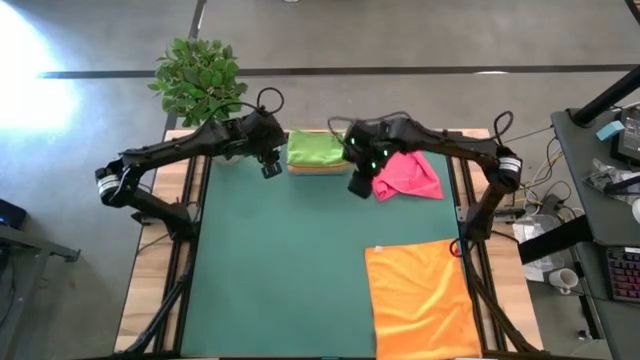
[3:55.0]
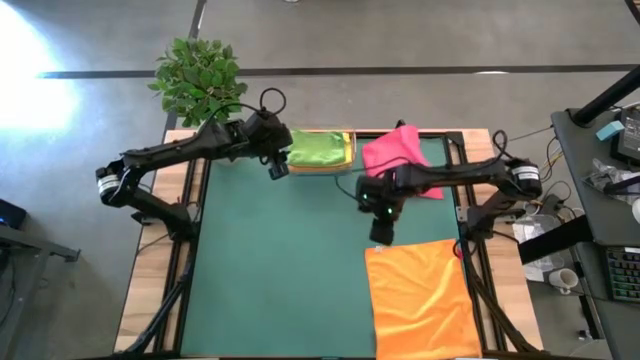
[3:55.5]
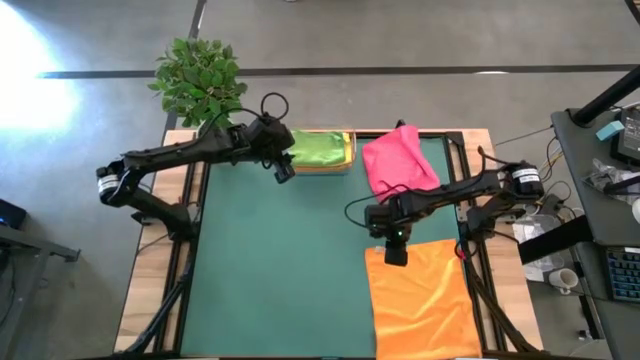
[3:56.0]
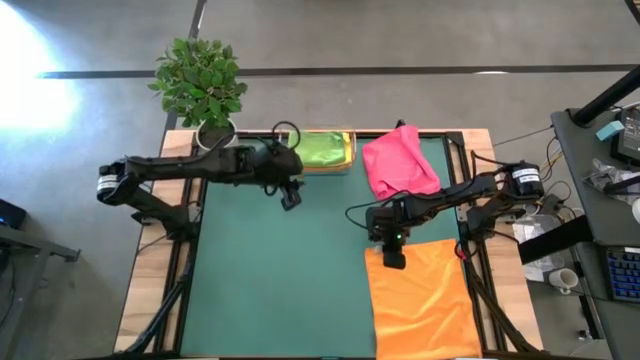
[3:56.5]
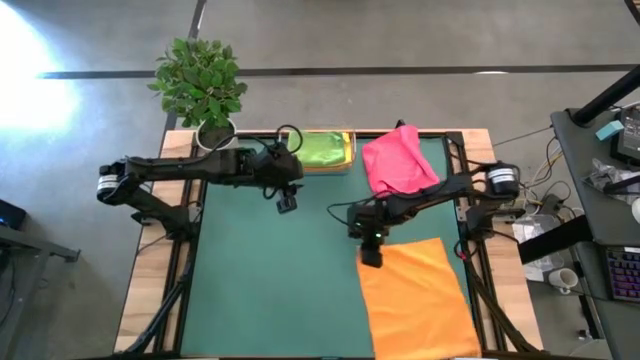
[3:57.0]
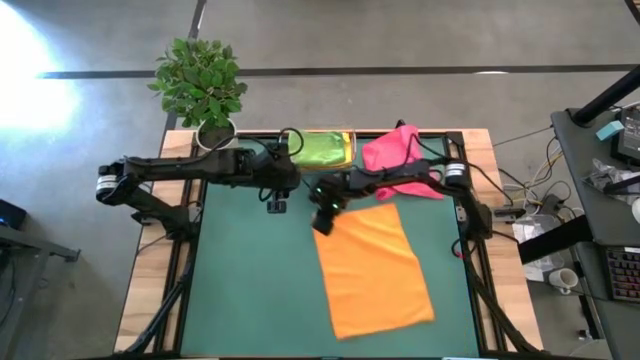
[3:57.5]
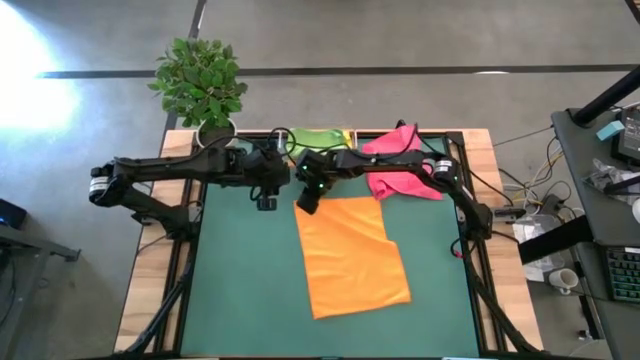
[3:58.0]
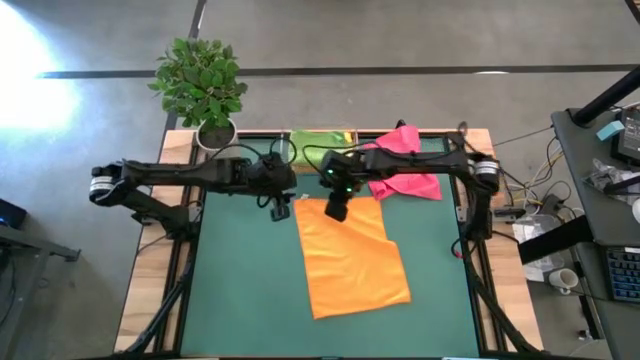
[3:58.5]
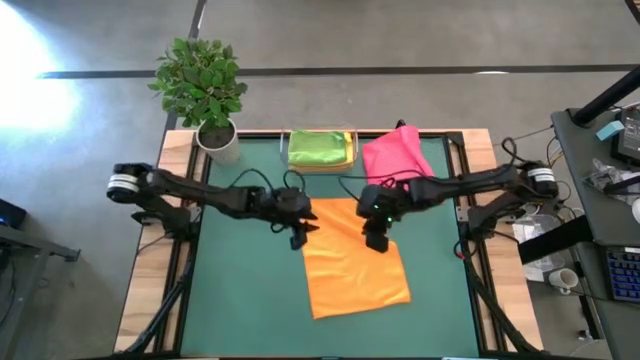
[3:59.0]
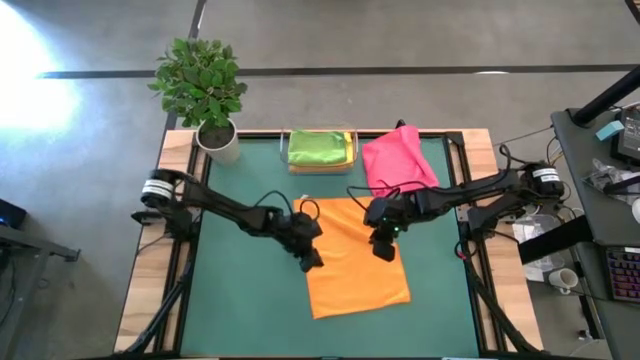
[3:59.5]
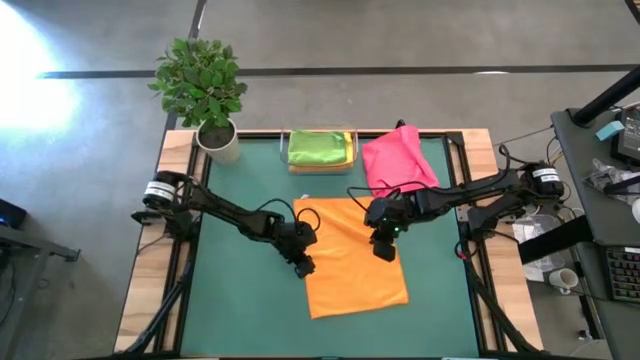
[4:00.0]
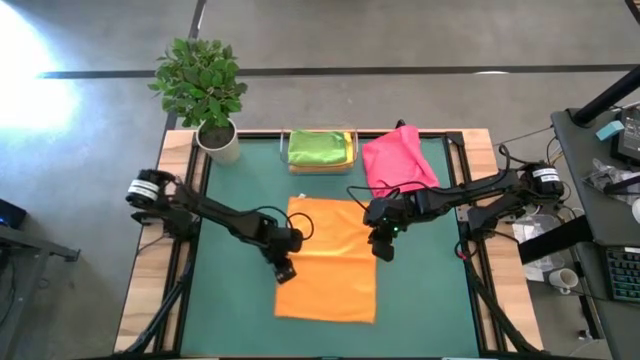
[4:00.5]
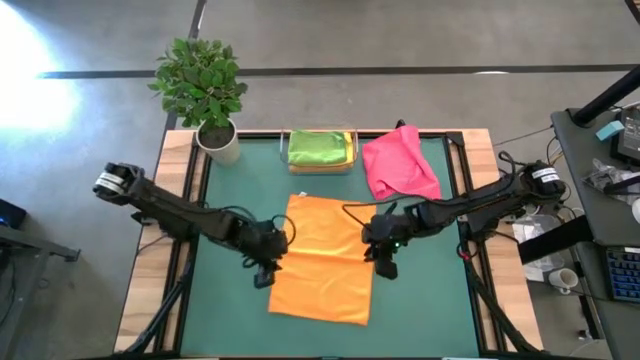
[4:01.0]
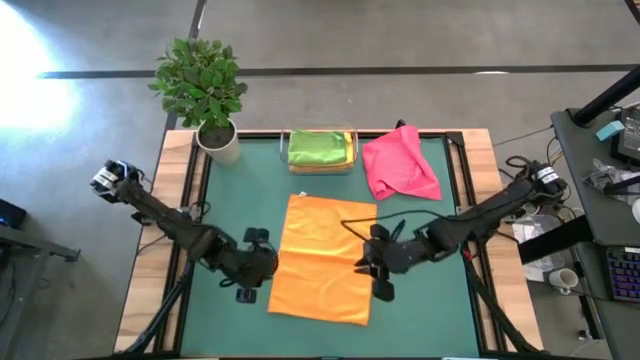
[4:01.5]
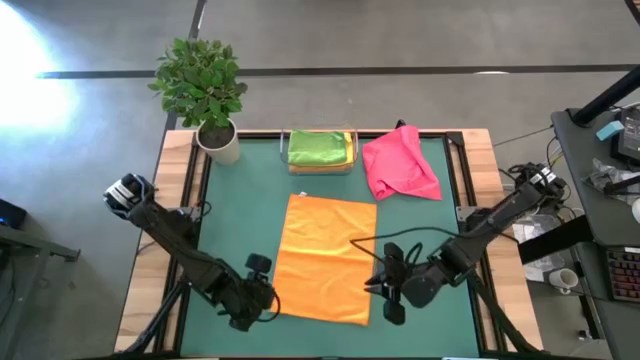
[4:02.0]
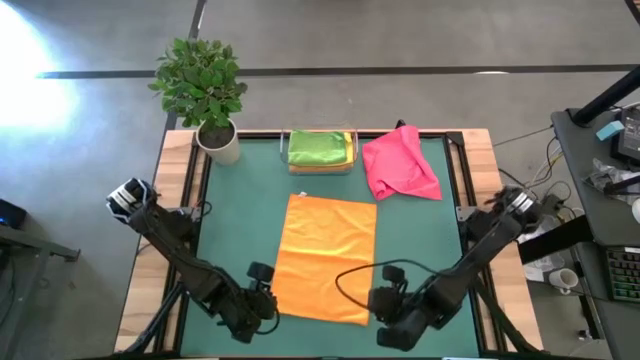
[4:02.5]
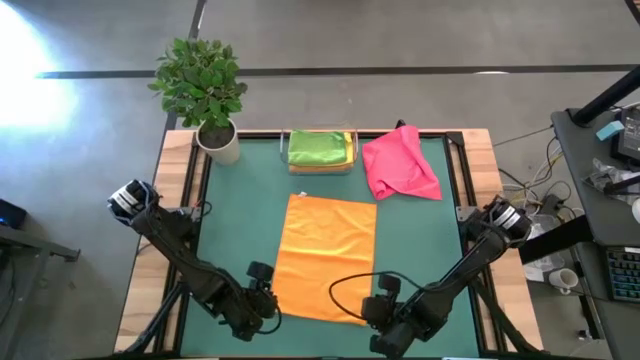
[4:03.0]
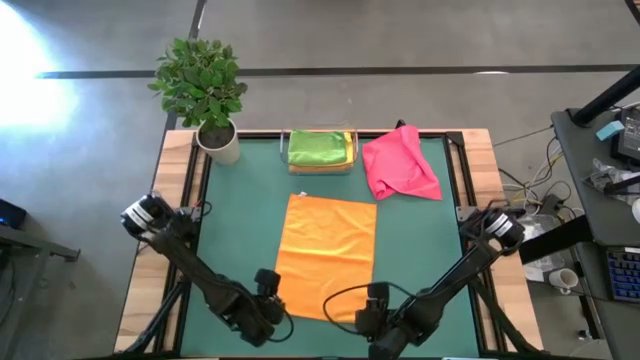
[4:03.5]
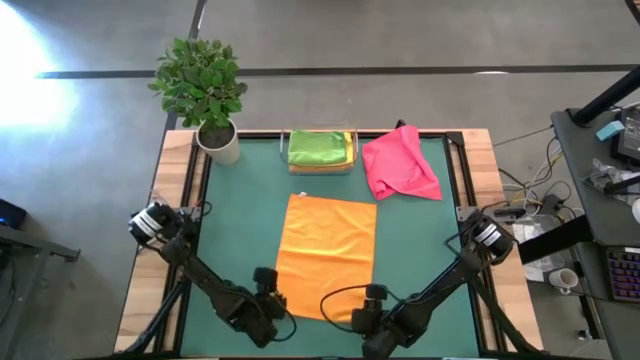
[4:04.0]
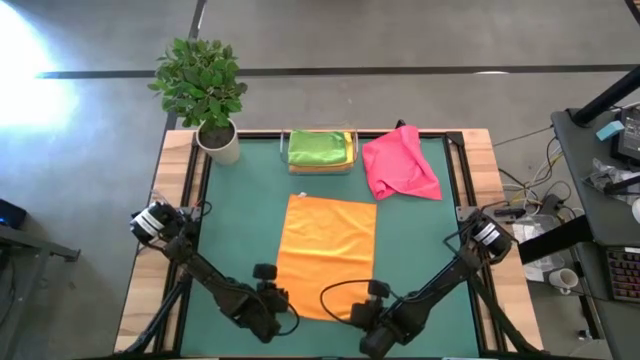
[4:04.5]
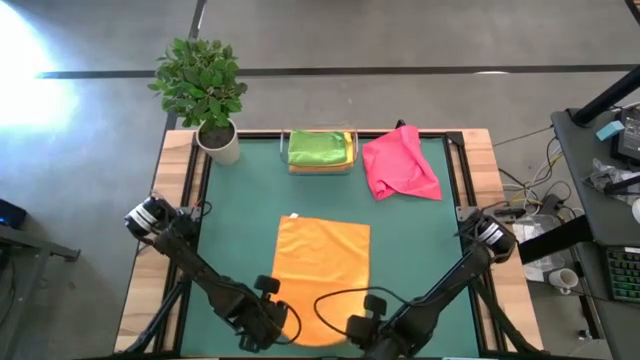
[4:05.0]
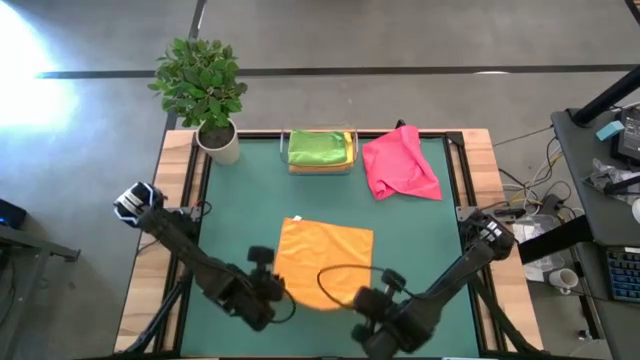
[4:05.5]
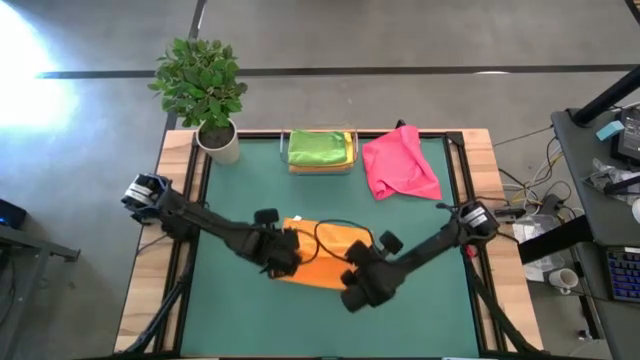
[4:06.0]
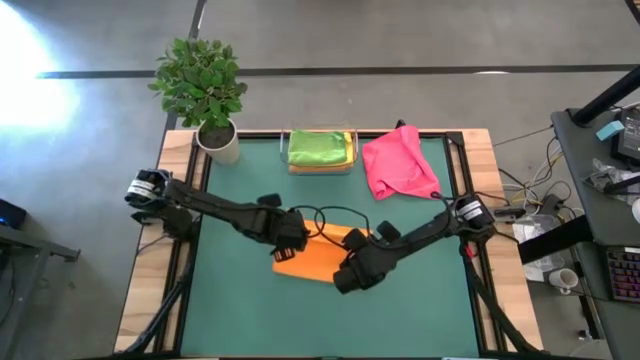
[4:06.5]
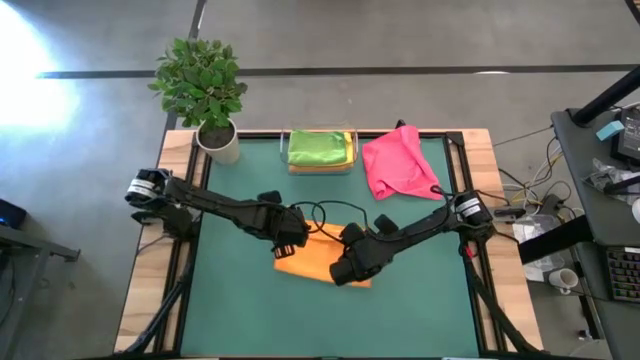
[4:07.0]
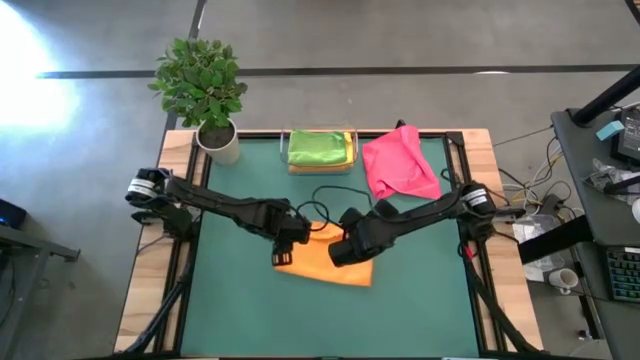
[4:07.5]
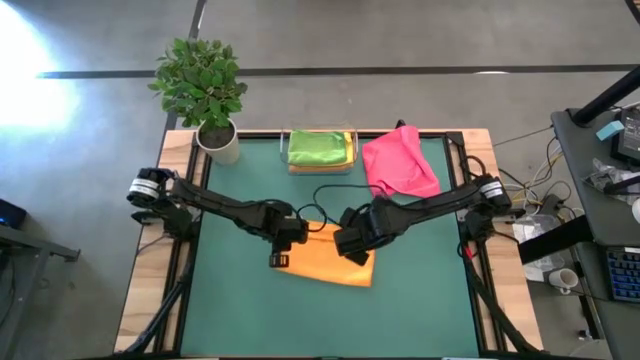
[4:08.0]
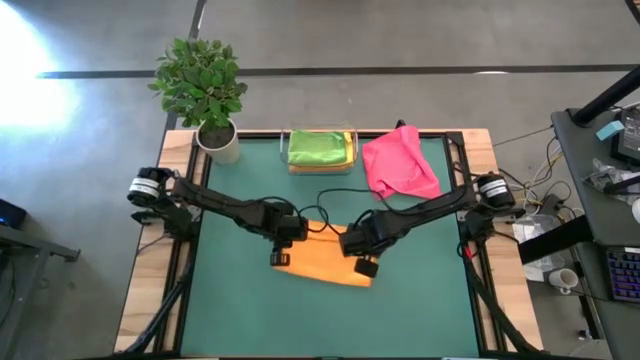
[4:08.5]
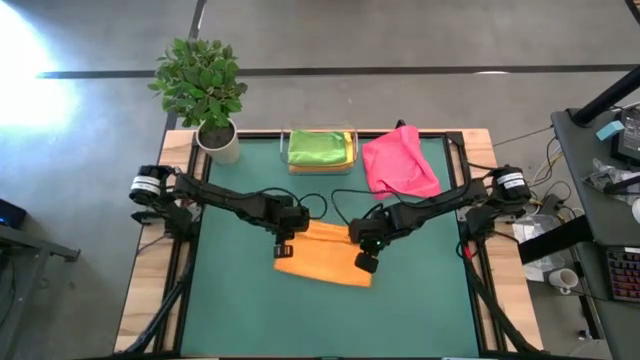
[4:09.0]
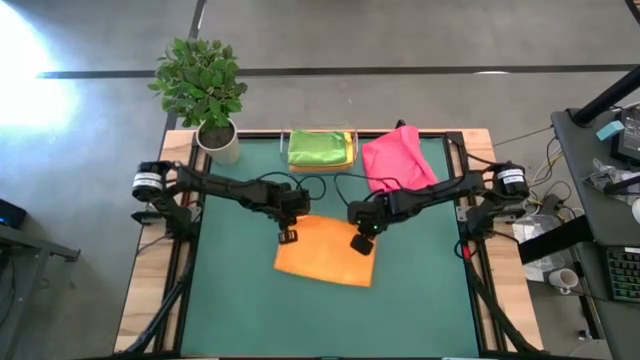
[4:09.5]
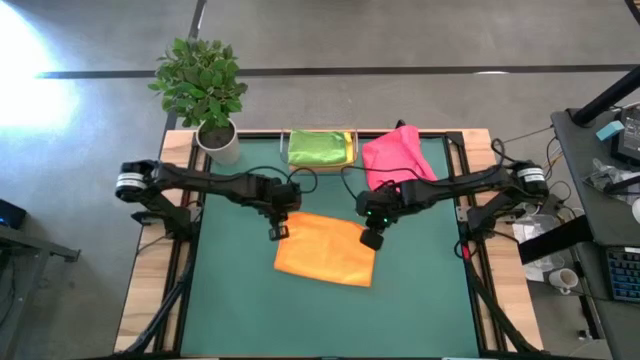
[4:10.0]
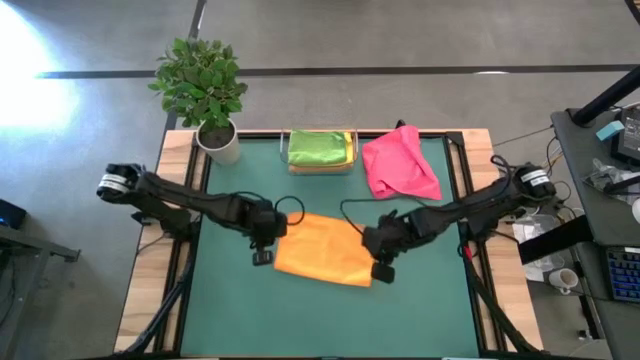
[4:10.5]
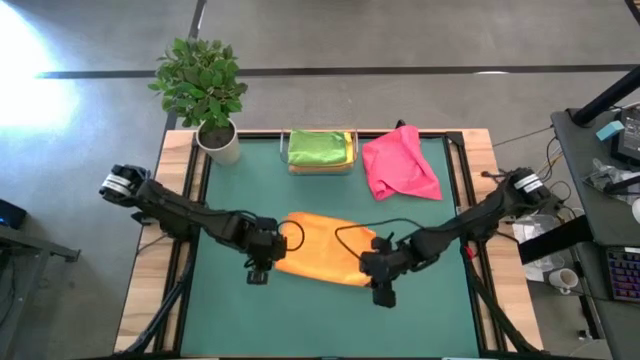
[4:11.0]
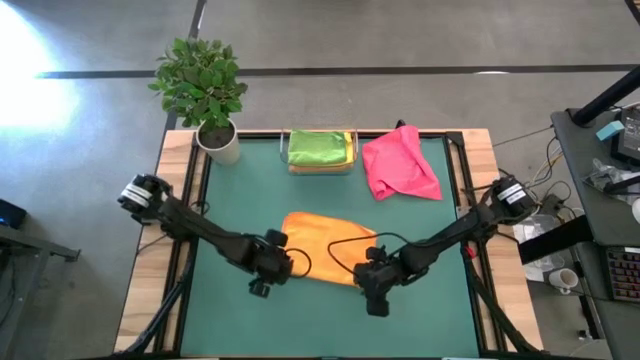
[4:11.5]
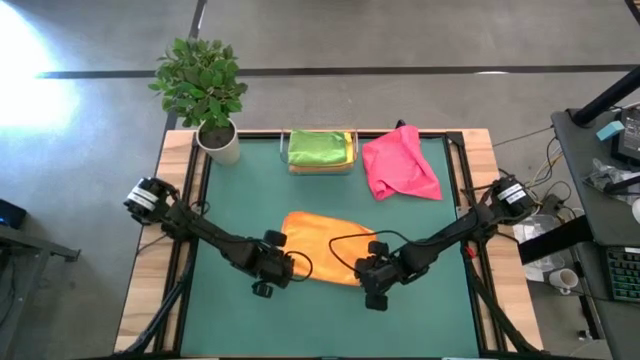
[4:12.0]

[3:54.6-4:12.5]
Task: Fold microfiber towels
Fold the orange microfiber towel
